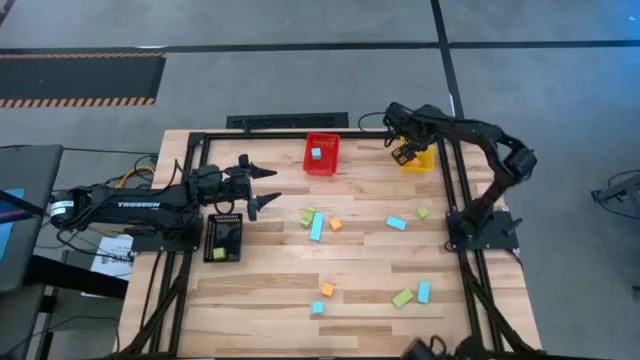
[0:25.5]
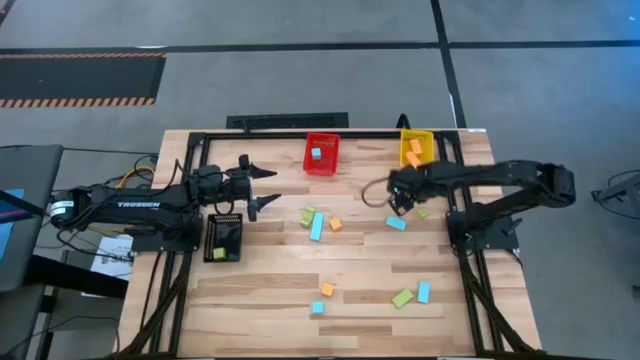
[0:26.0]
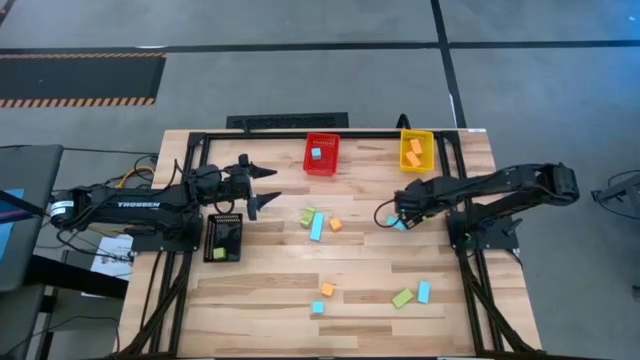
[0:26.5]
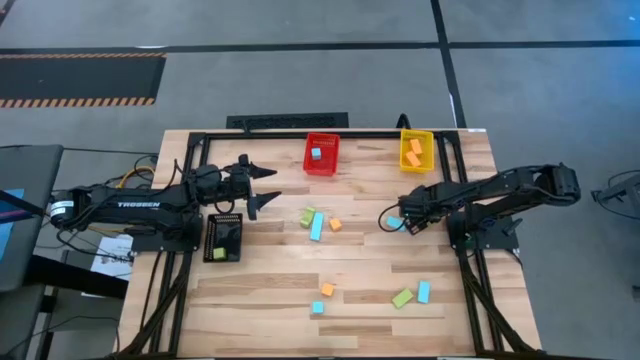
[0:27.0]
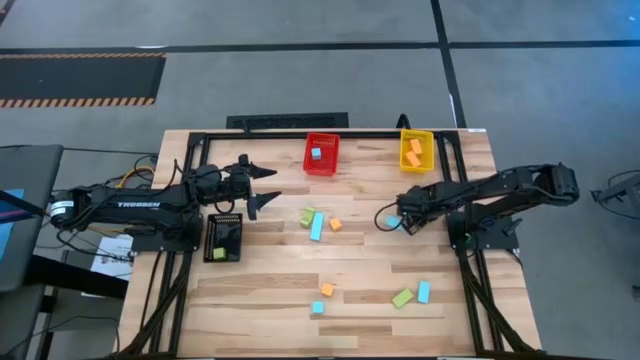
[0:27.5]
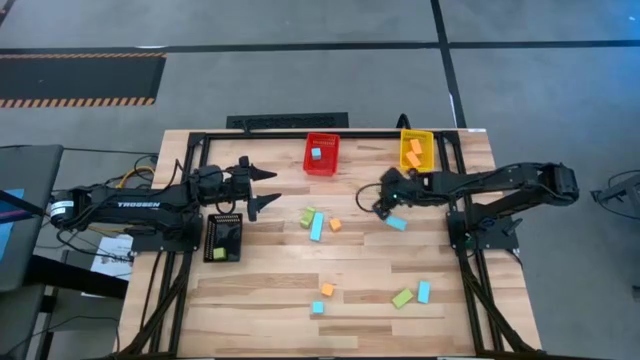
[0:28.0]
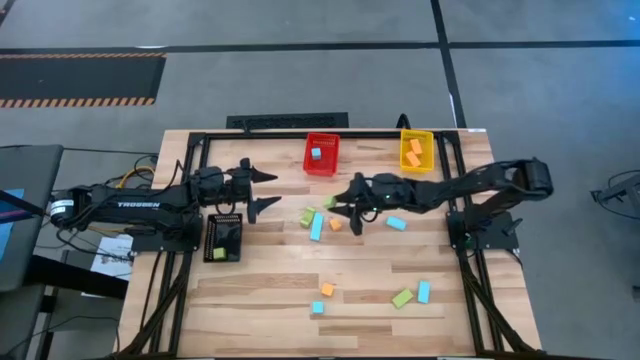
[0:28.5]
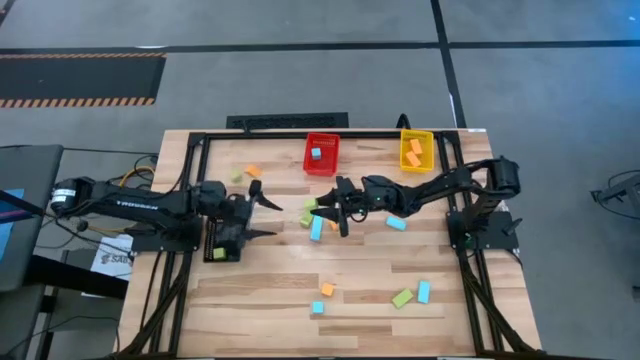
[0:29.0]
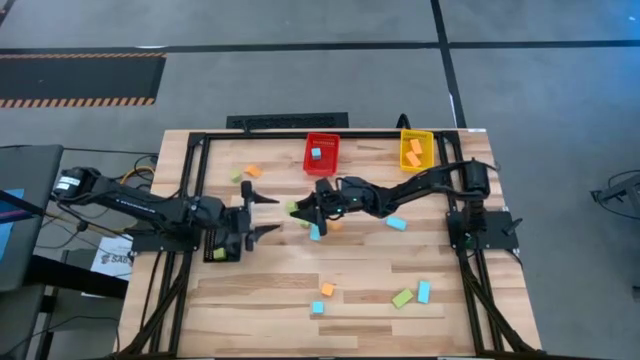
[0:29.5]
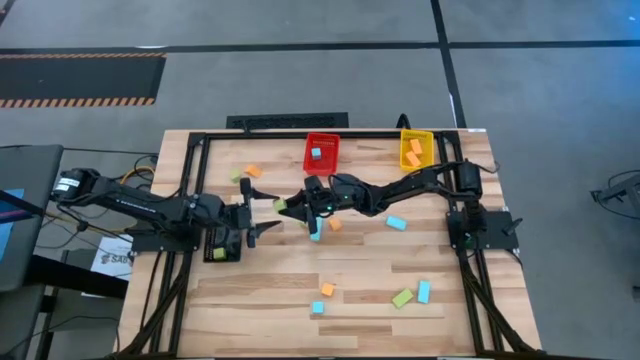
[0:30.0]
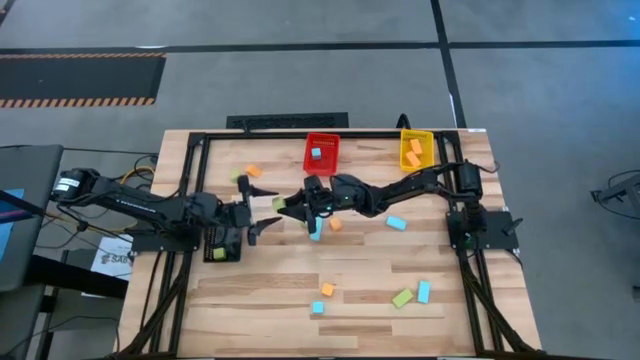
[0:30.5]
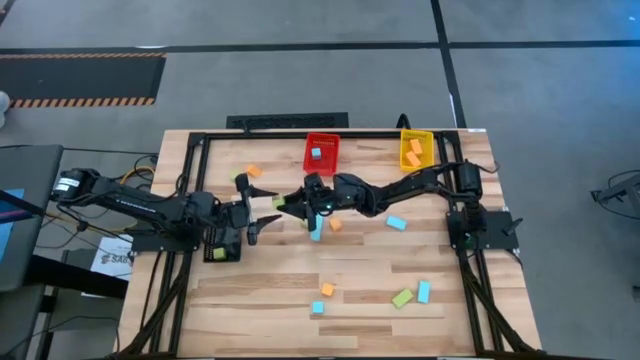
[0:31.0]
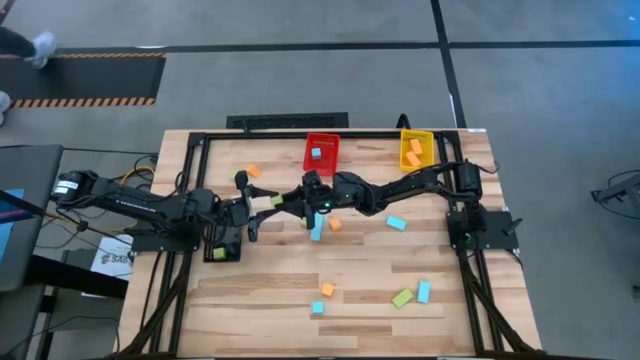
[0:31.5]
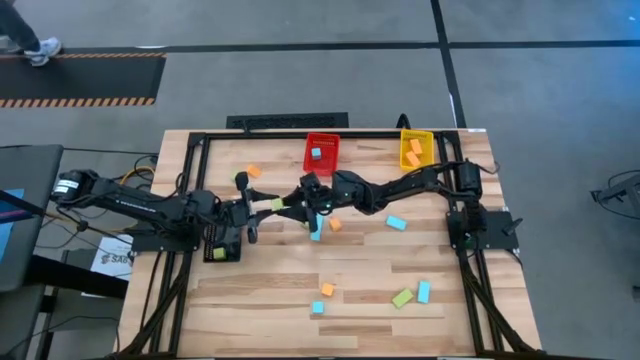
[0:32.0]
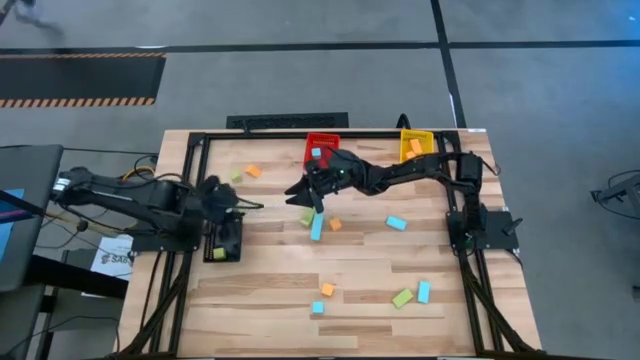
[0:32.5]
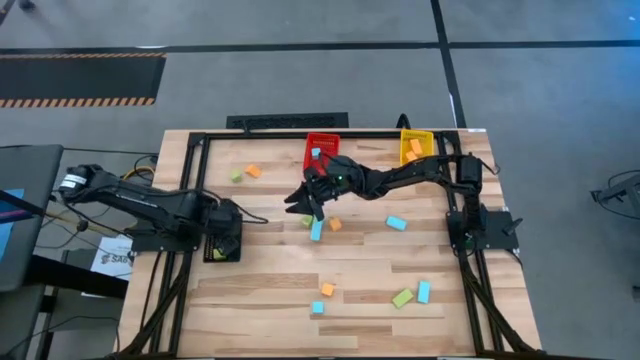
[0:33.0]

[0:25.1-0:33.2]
Task: Sort & place blocks by color
Put the green block into the black bin

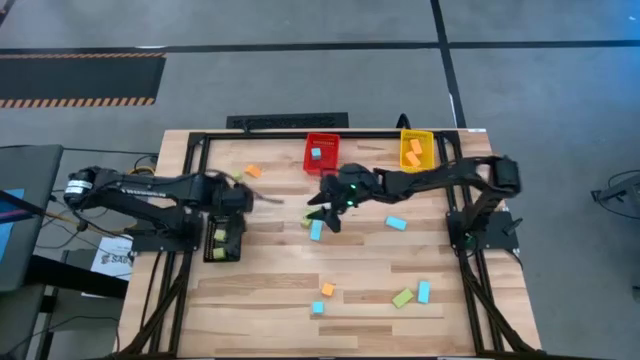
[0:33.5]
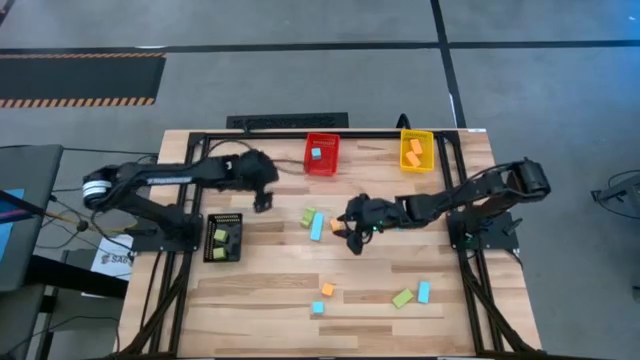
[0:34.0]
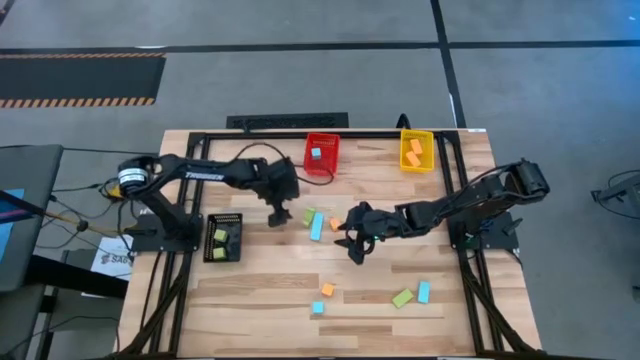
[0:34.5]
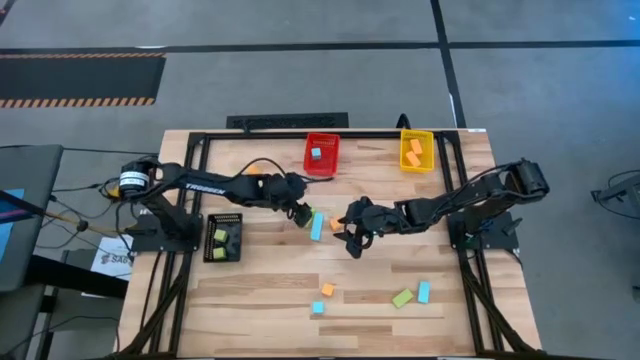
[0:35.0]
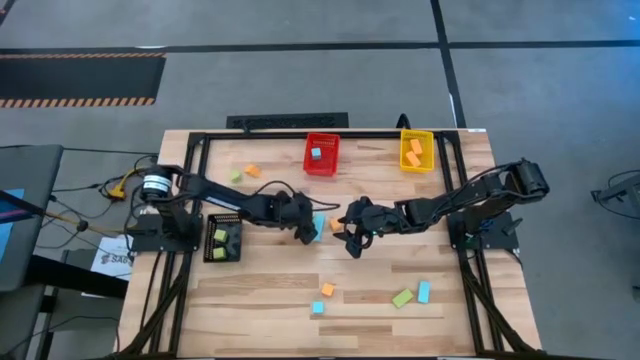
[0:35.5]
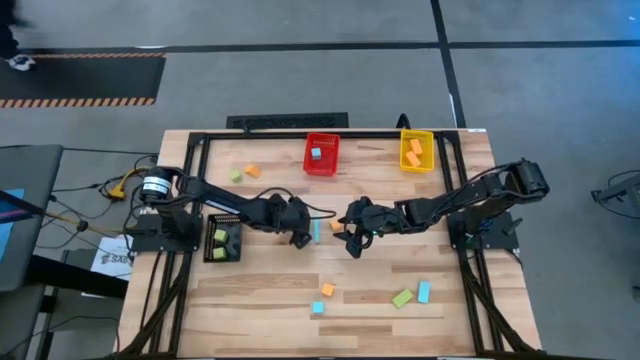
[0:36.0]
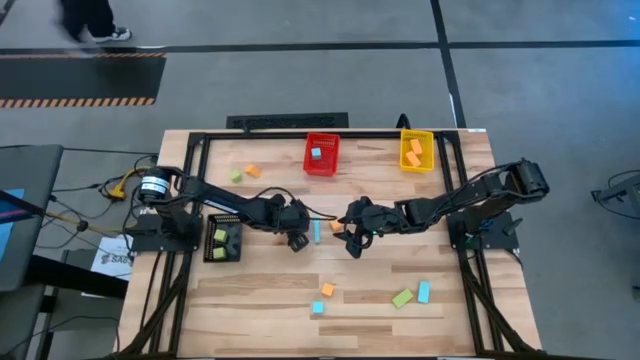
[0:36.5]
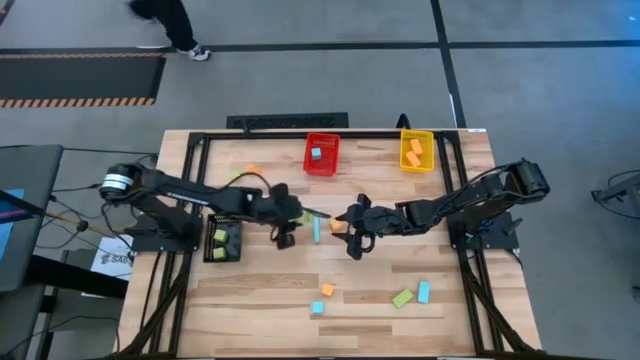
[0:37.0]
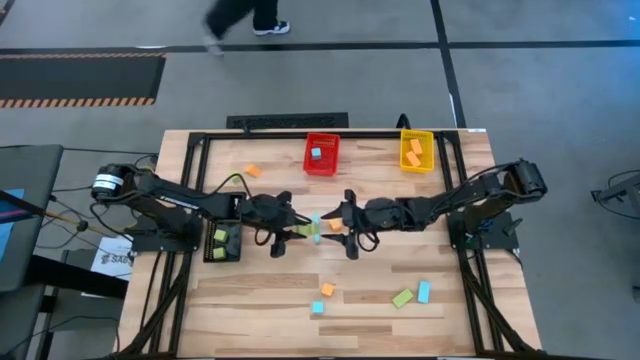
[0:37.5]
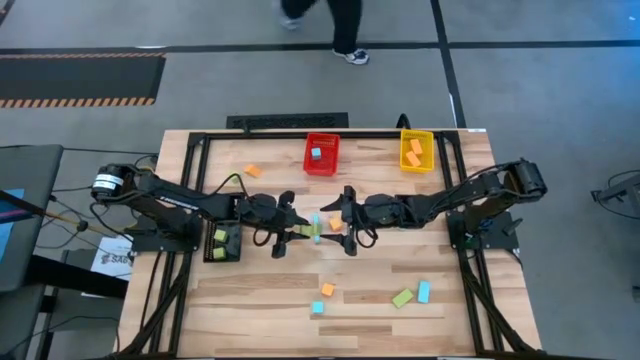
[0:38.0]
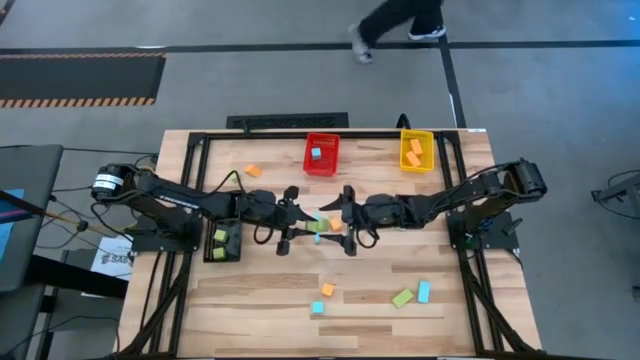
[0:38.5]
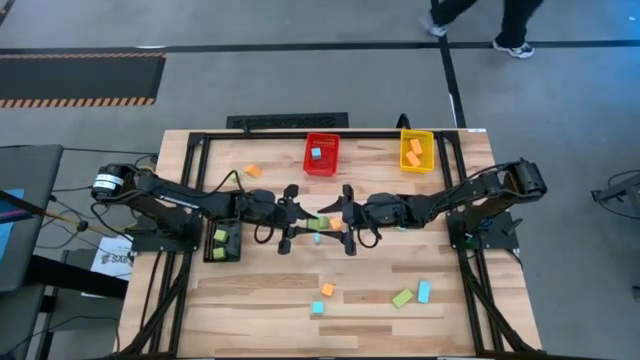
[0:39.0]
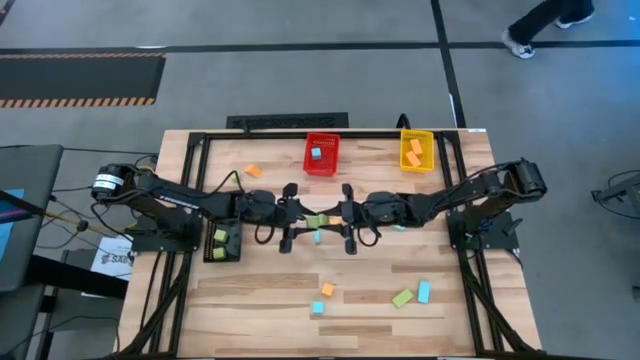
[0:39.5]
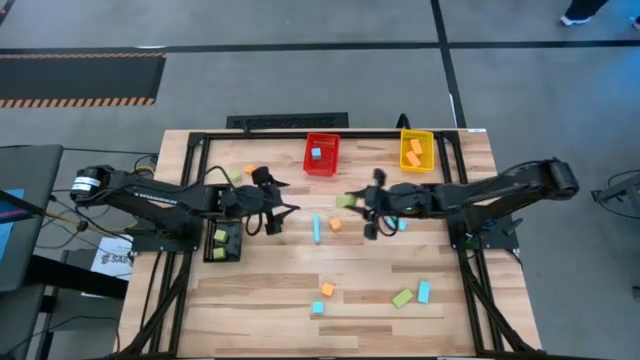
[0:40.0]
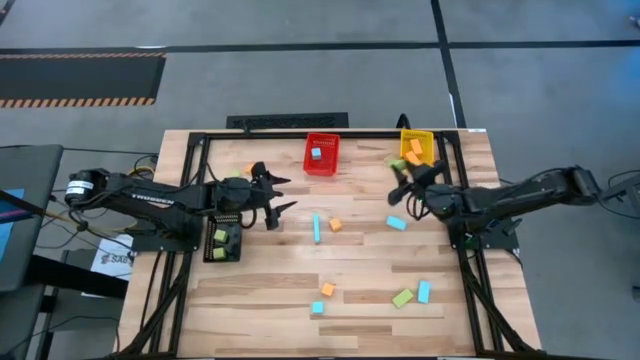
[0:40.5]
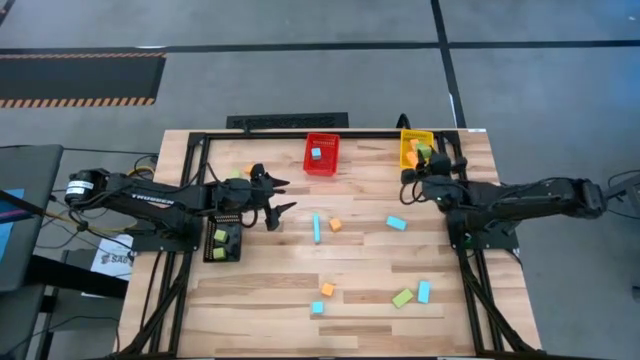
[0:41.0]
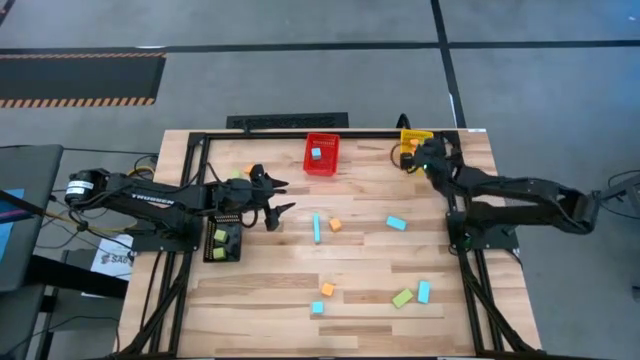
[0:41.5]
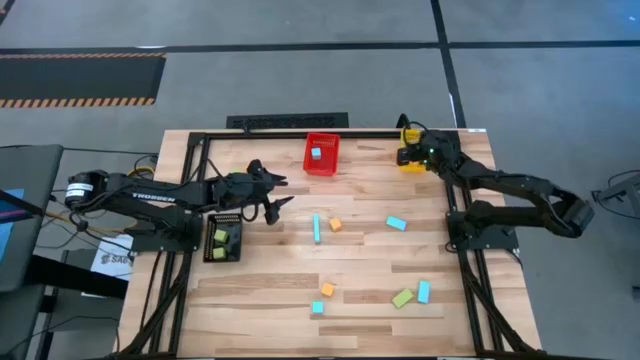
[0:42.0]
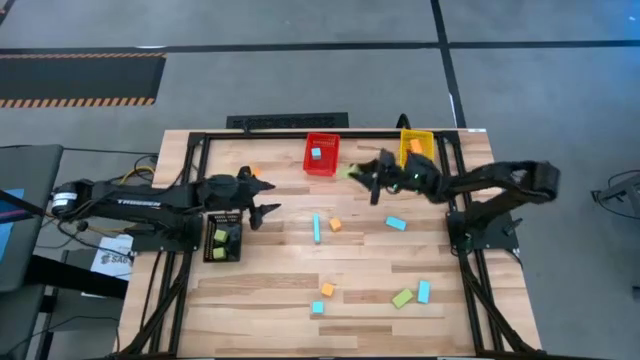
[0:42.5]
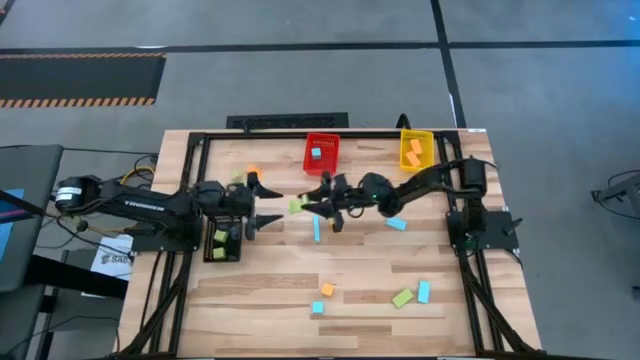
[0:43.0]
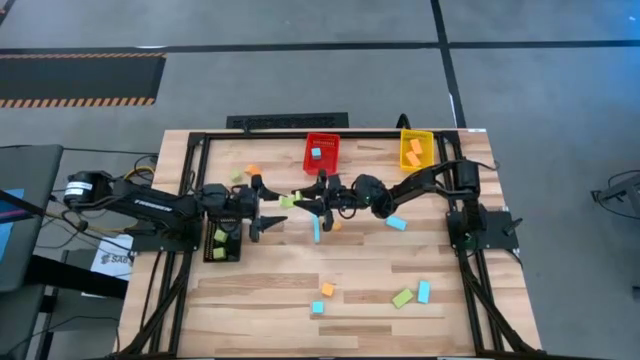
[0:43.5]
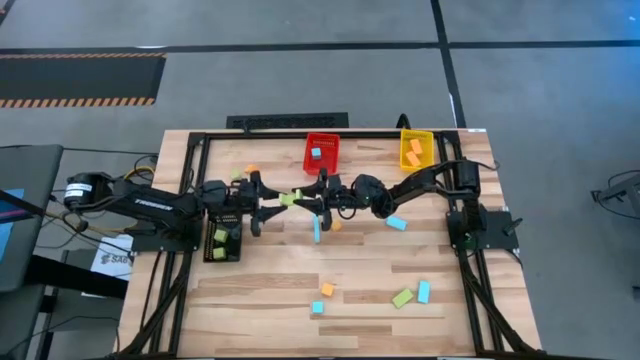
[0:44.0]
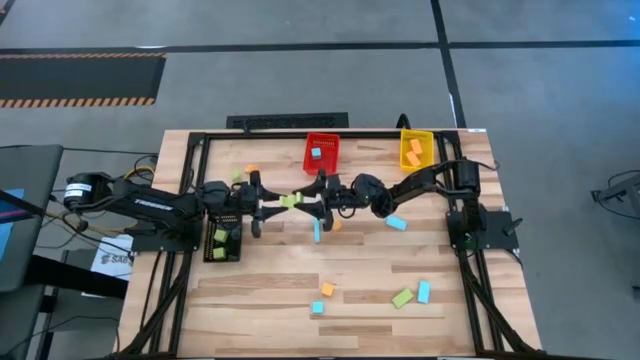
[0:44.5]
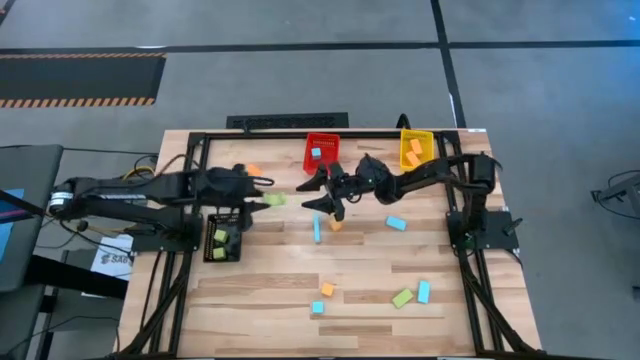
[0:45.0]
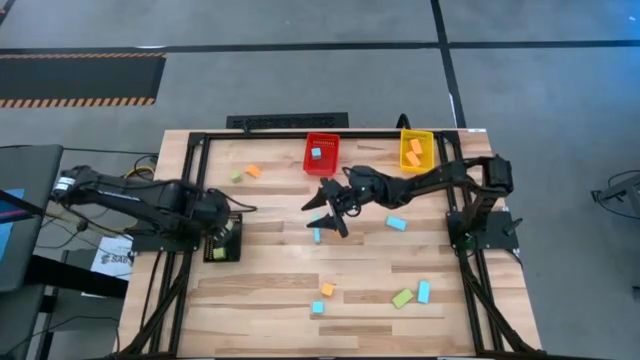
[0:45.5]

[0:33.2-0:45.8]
Put the green block into the black bin
